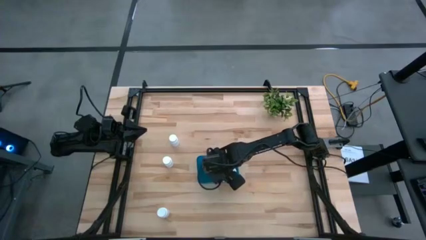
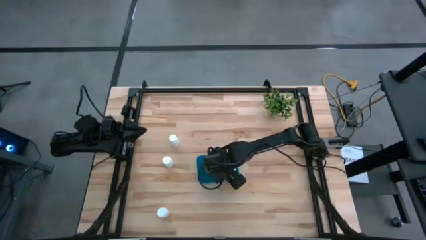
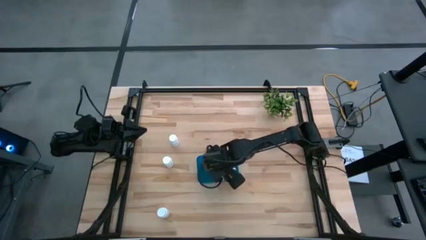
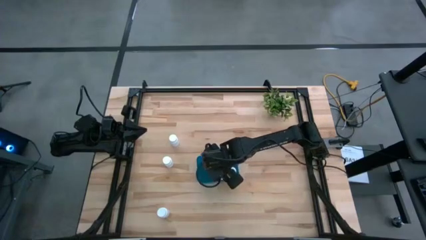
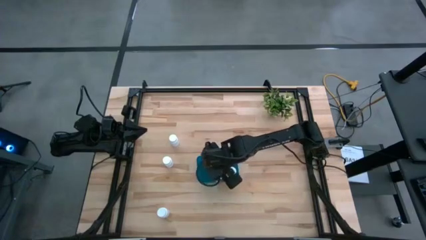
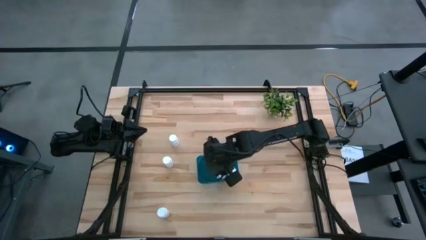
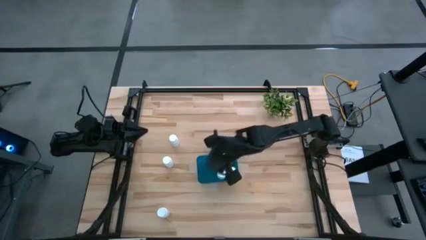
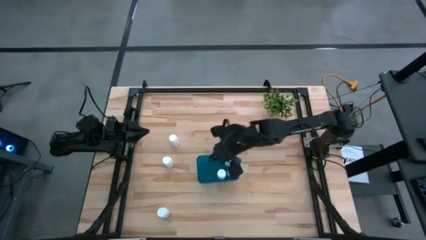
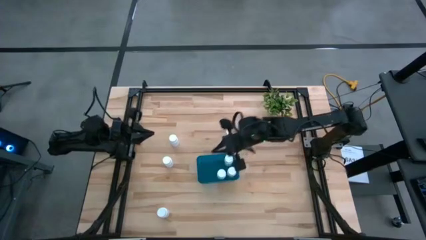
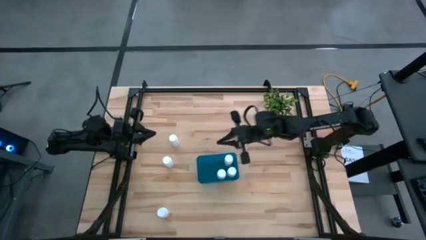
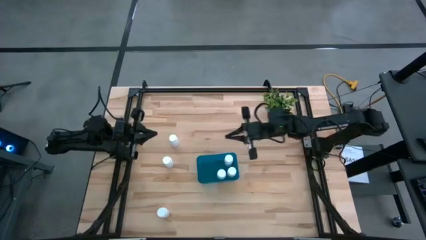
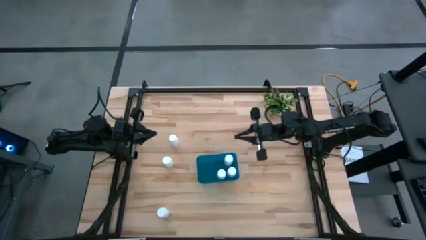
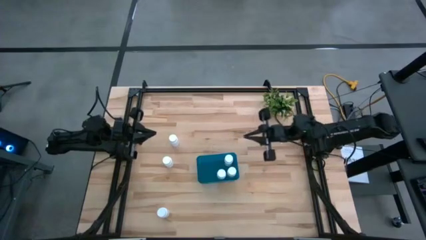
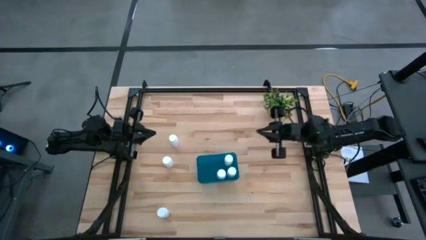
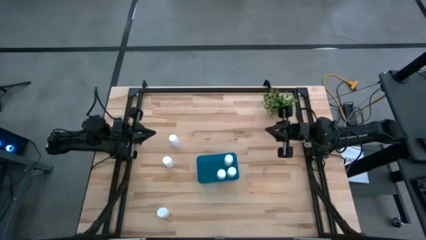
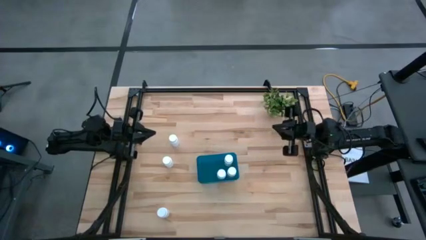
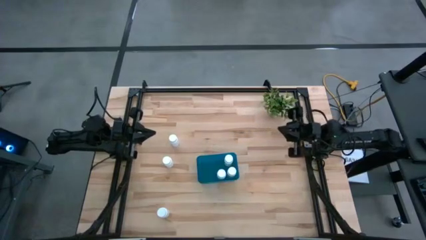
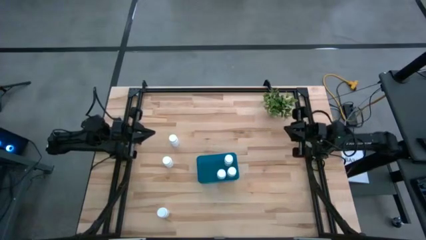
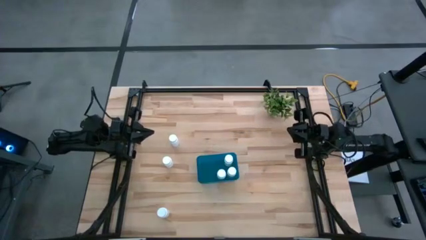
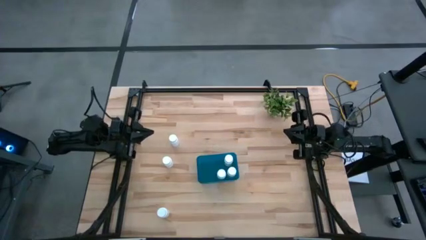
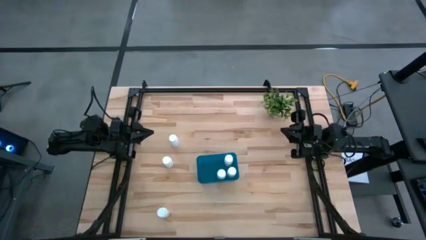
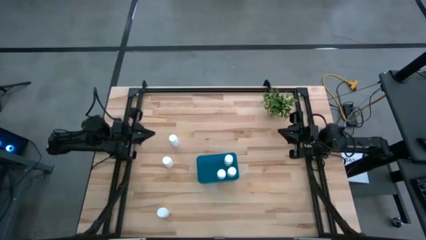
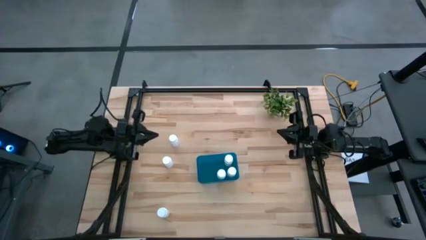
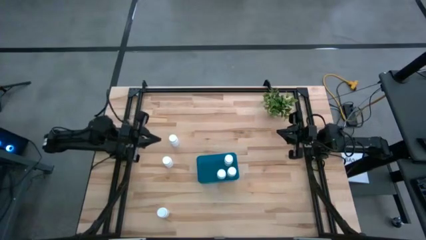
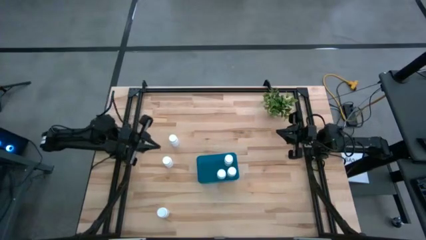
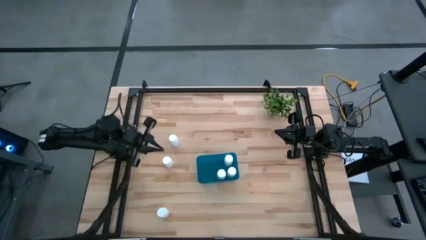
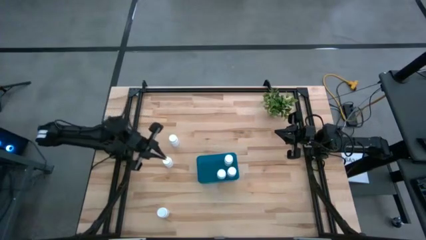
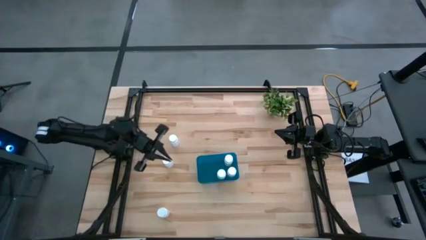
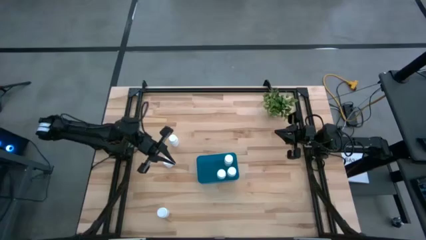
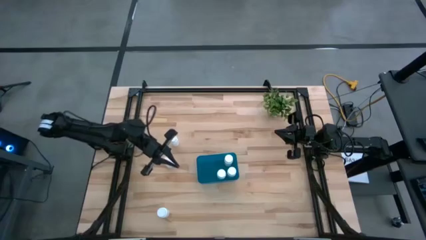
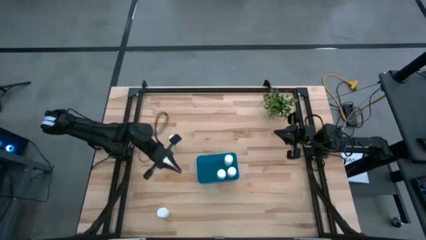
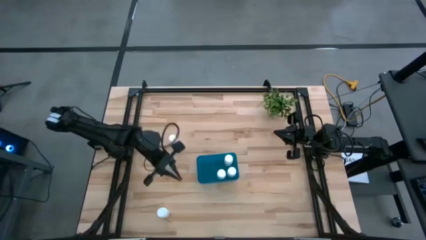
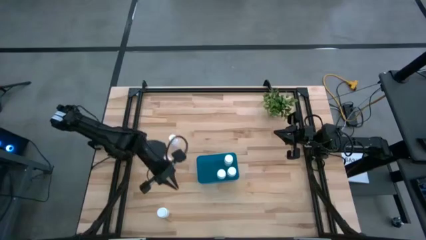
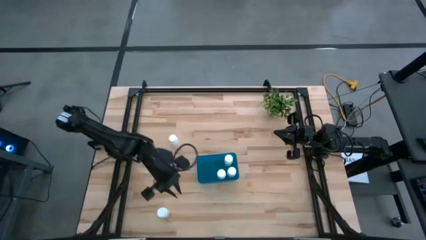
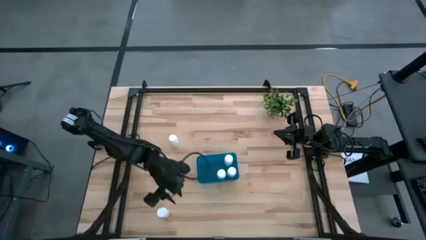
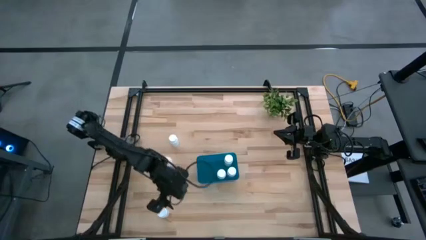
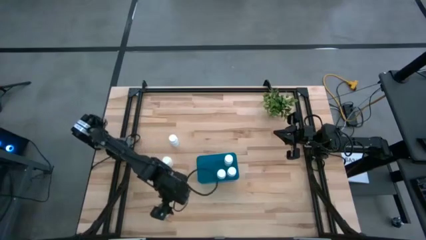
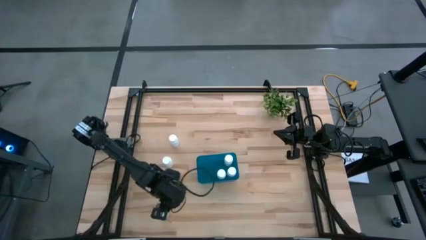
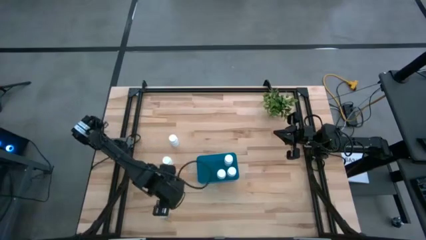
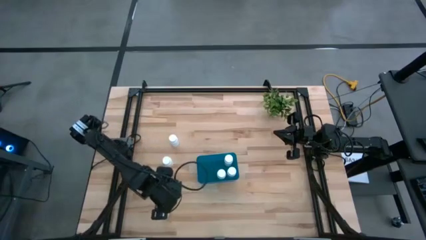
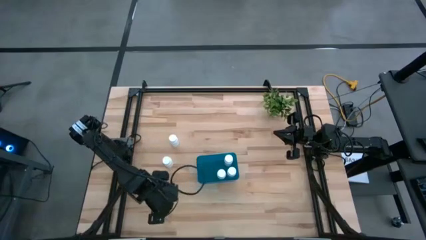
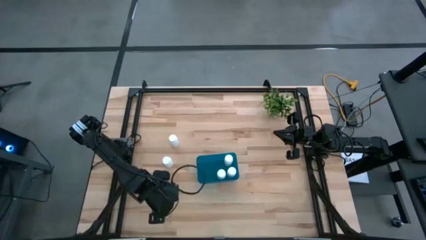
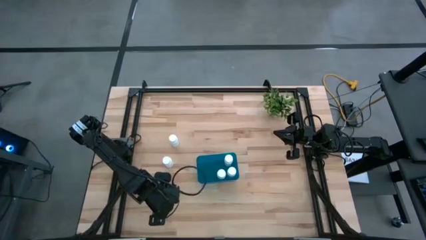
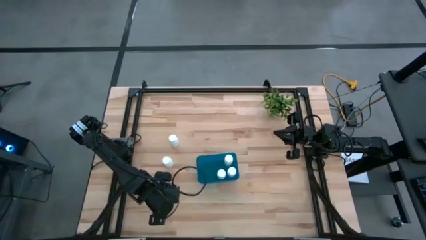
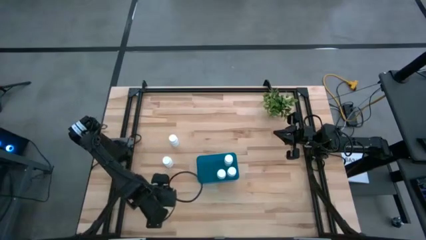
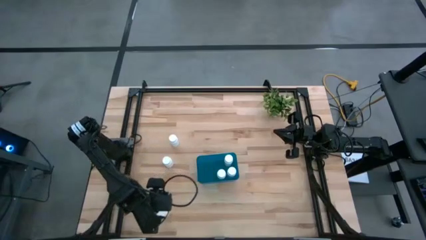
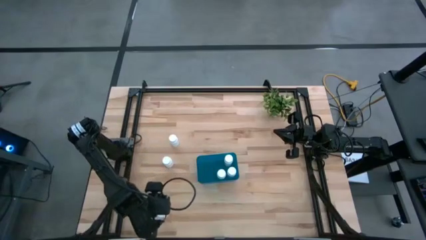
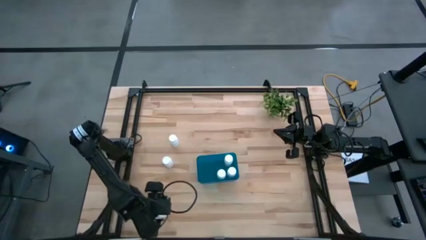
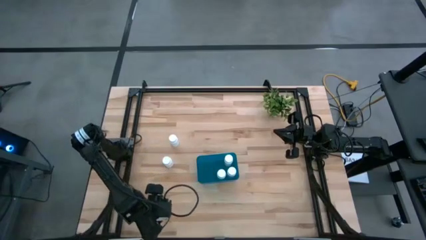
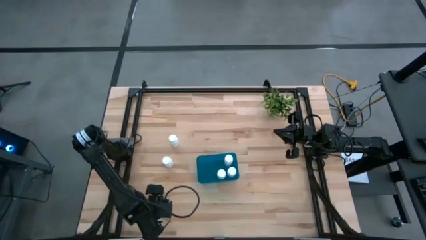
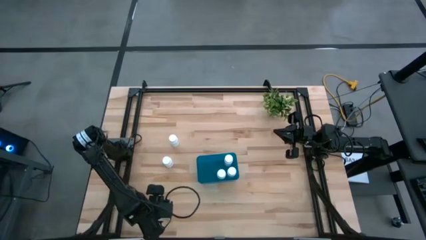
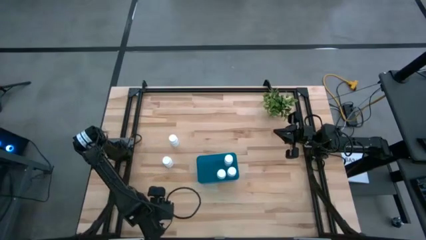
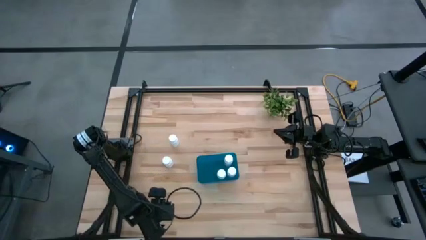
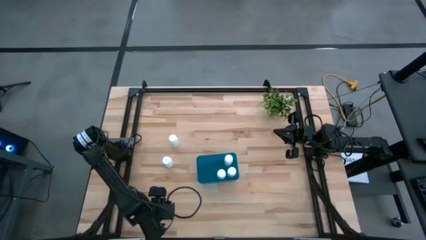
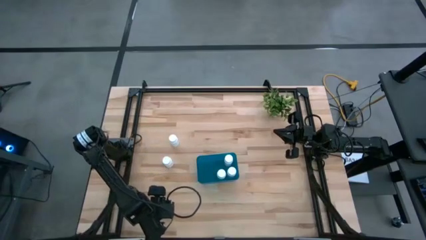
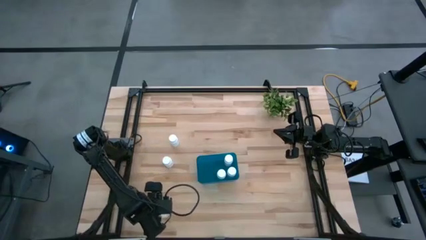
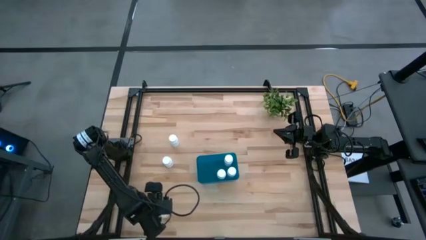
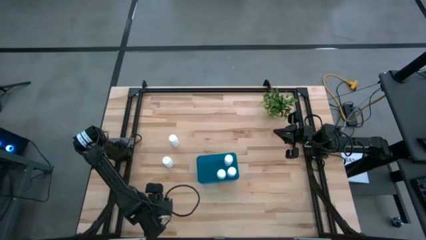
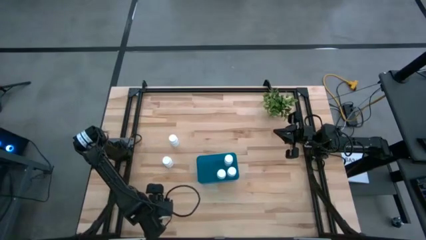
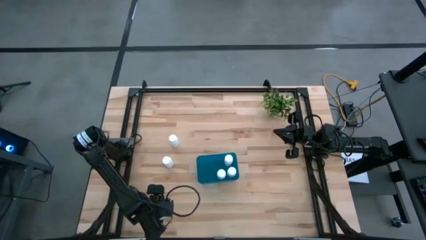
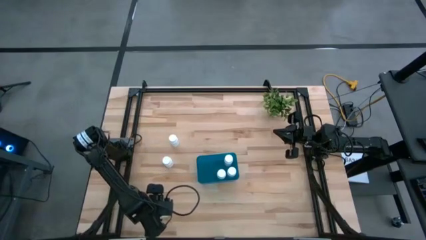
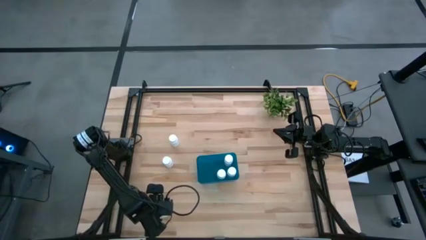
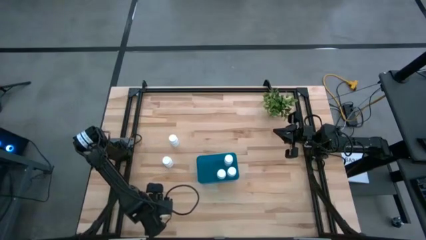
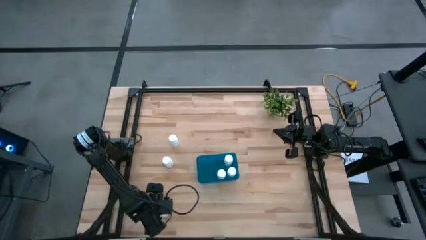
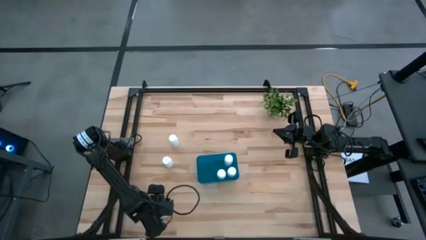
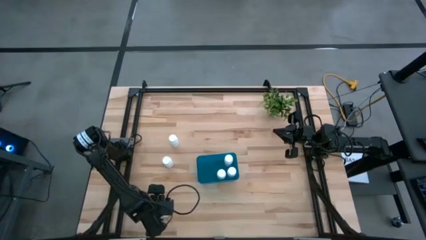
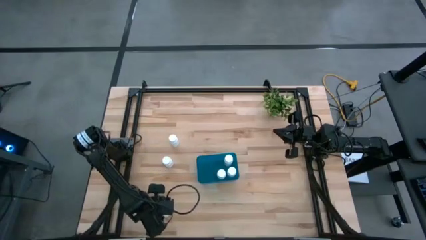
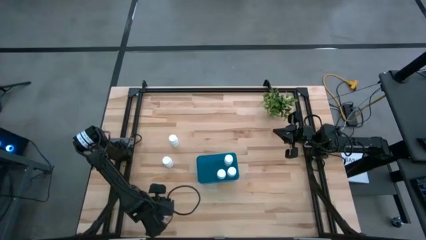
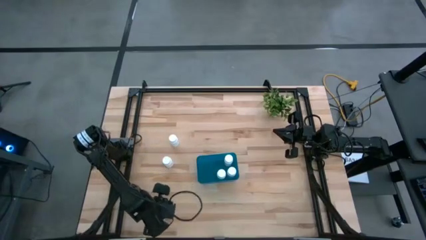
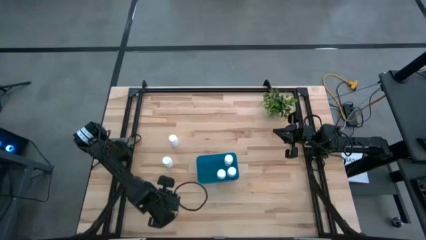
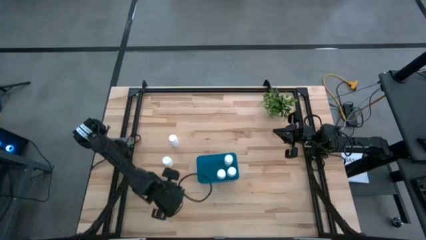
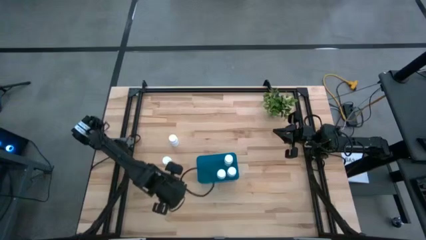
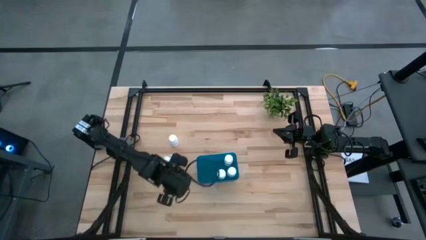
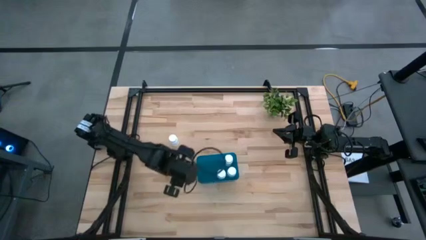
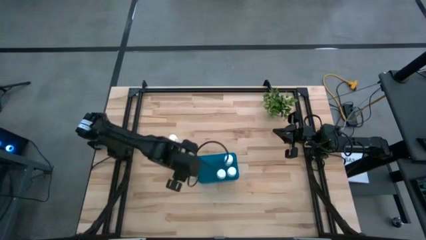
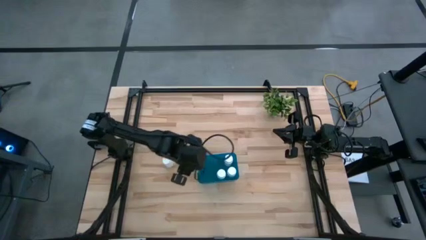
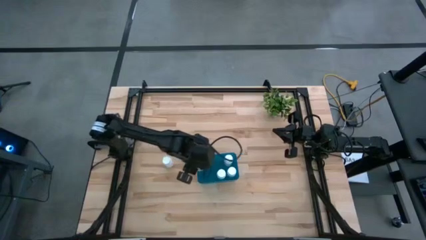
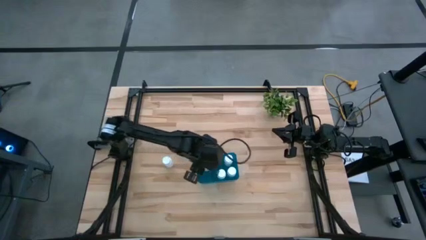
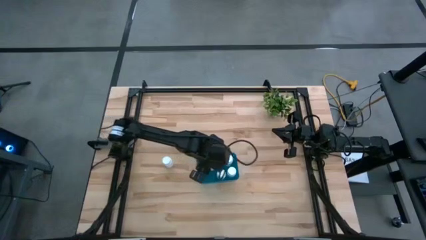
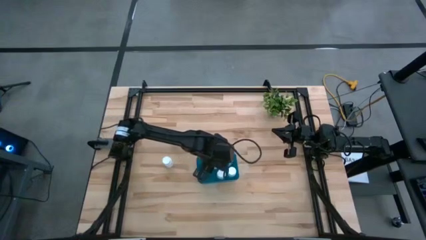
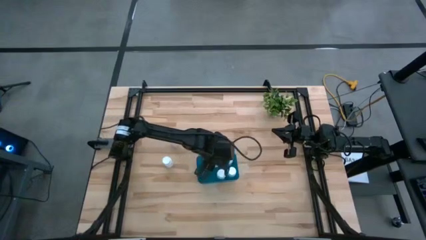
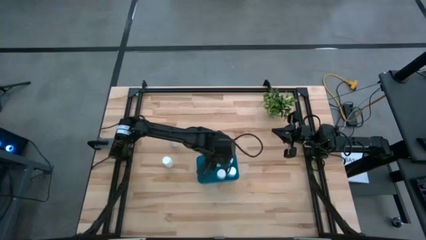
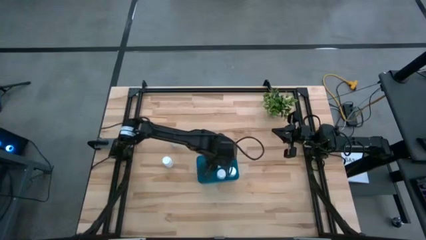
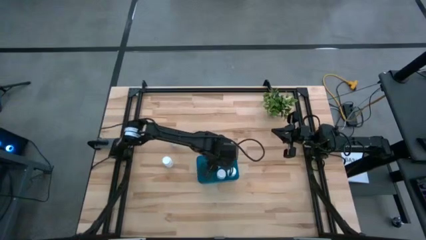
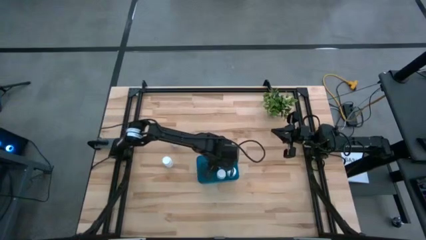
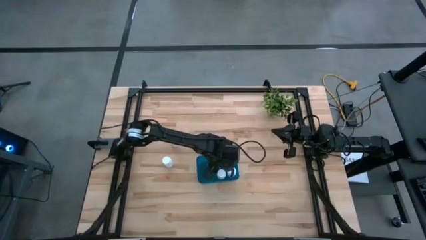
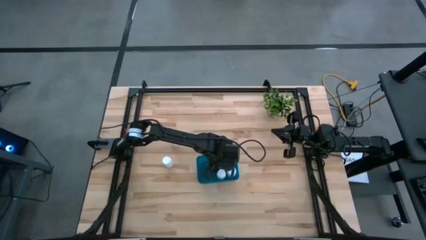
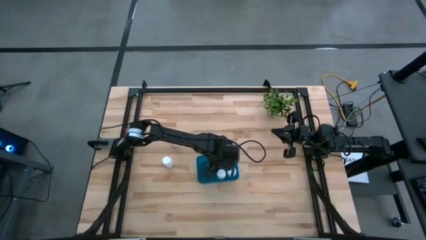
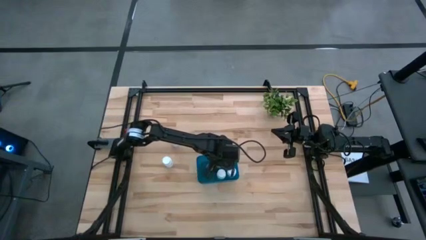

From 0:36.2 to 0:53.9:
Task: Pick and place pill bottles into a basket
Put the medicine bottle into the blue bin
